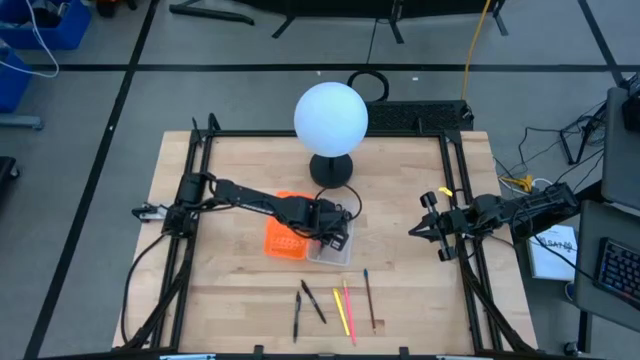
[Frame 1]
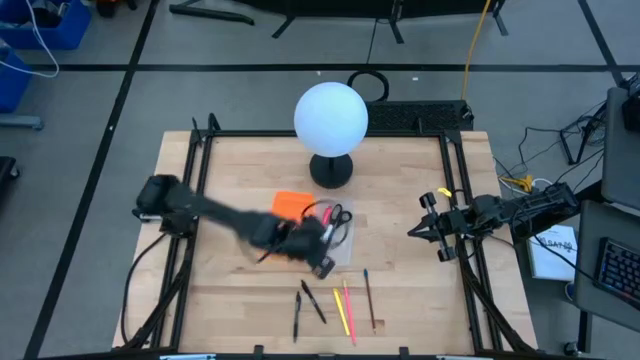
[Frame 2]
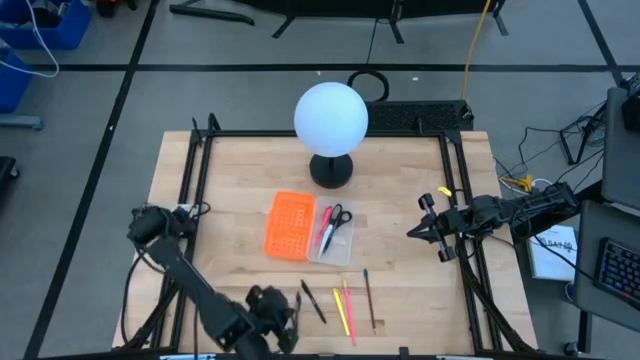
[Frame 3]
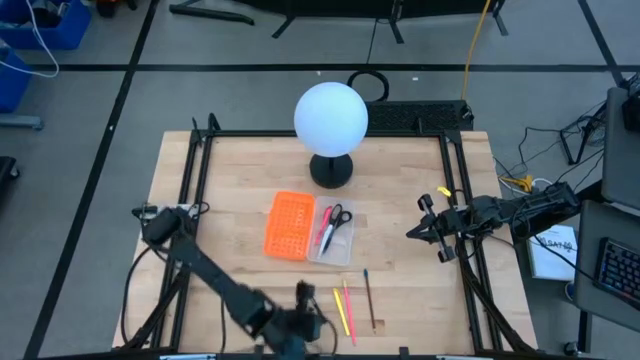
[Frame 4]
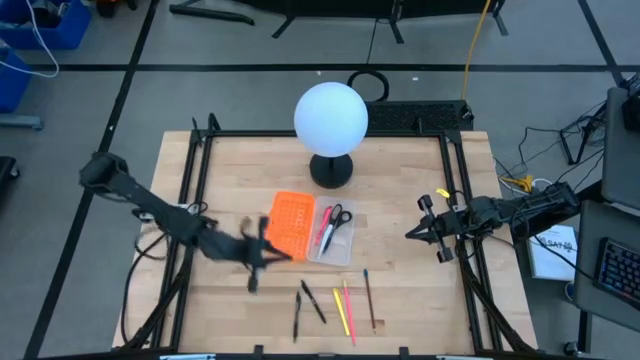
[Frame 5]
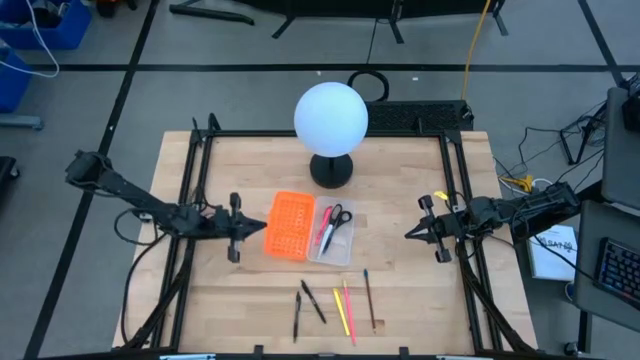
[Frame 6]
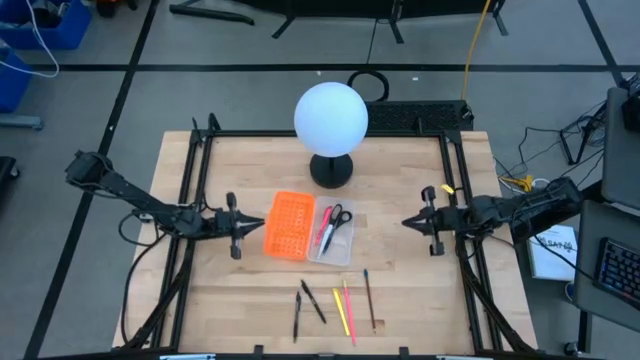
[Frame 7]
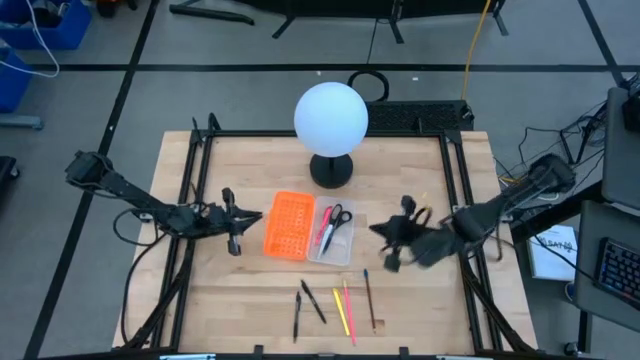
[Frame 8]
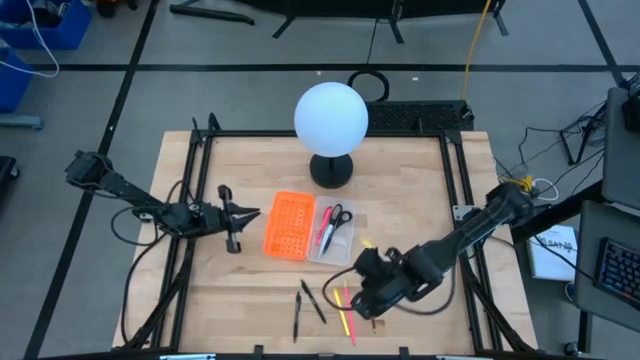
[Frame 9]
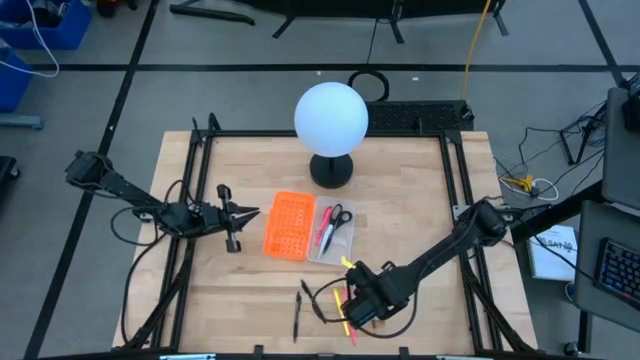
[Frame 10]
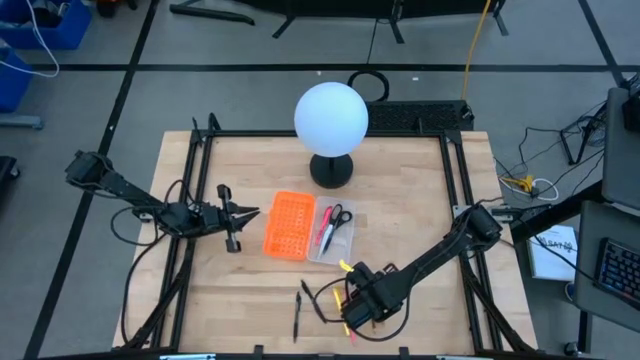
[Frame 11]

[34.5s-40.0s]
Task: Pick & place school supplies into a supply box
Put the brown pencil into the supply box

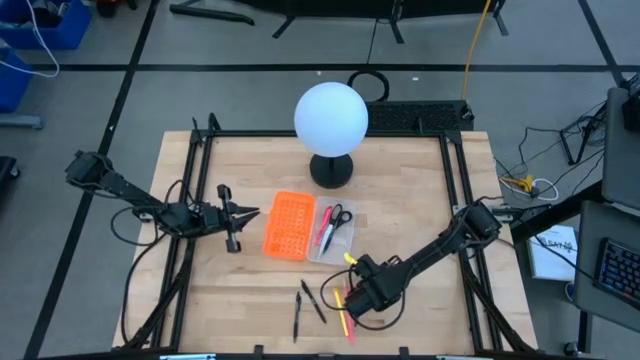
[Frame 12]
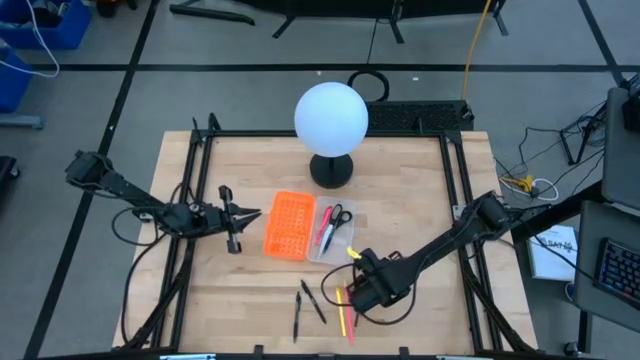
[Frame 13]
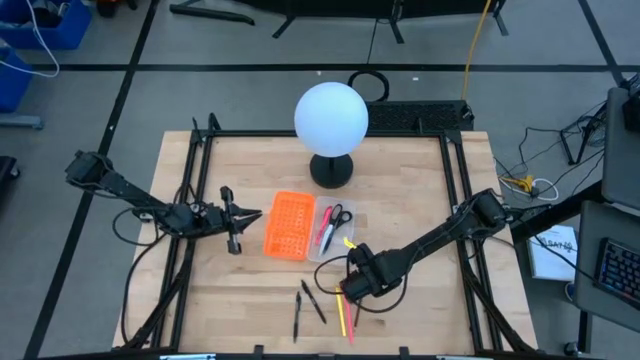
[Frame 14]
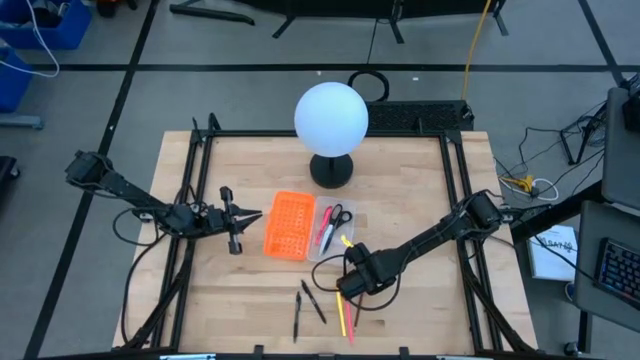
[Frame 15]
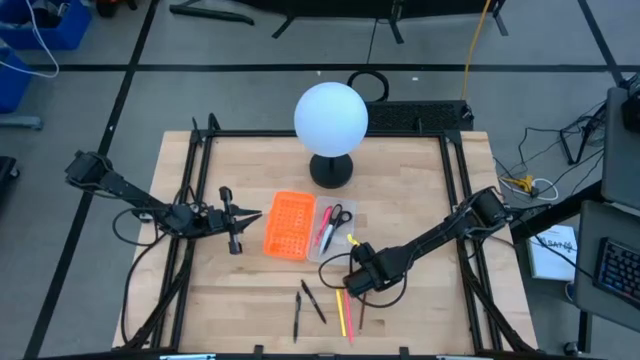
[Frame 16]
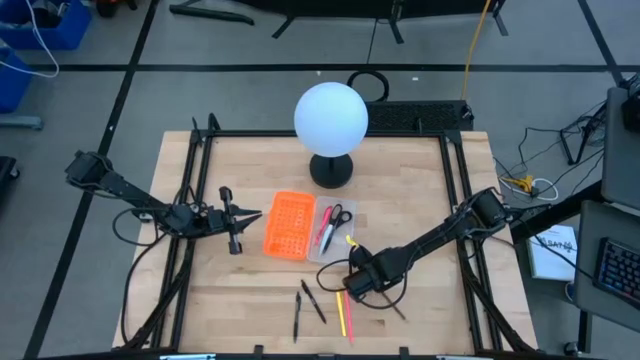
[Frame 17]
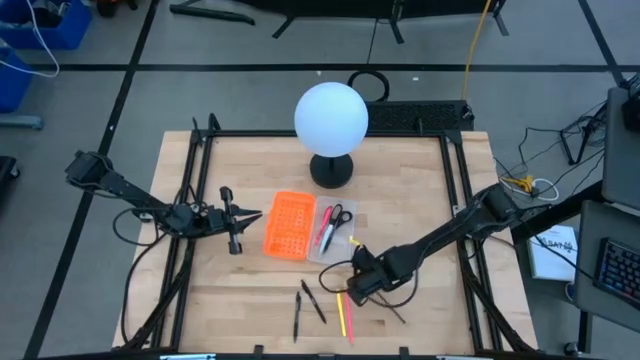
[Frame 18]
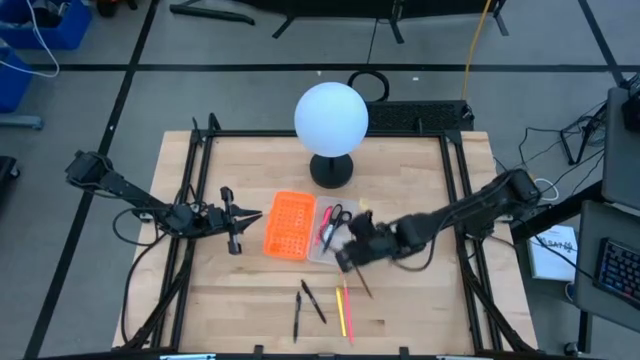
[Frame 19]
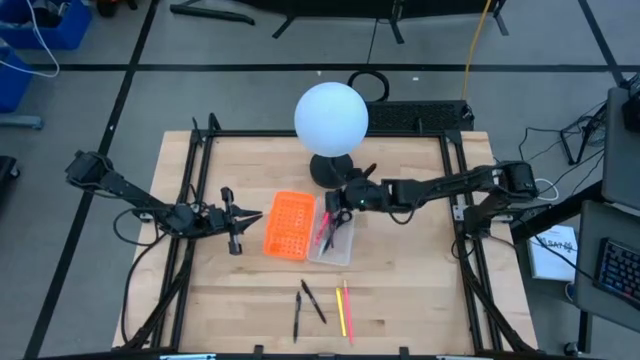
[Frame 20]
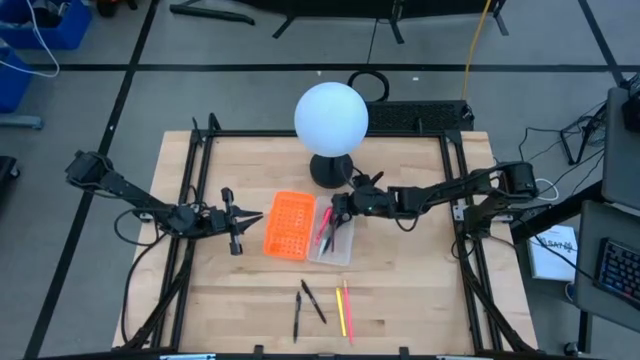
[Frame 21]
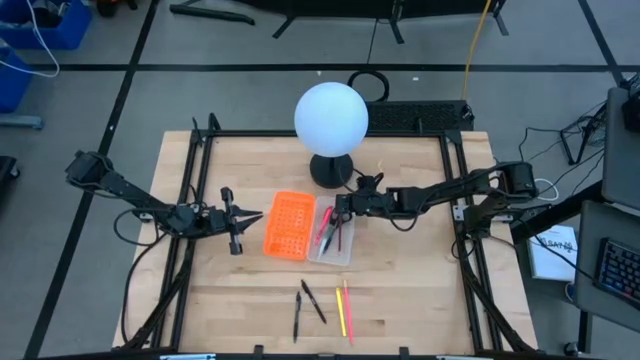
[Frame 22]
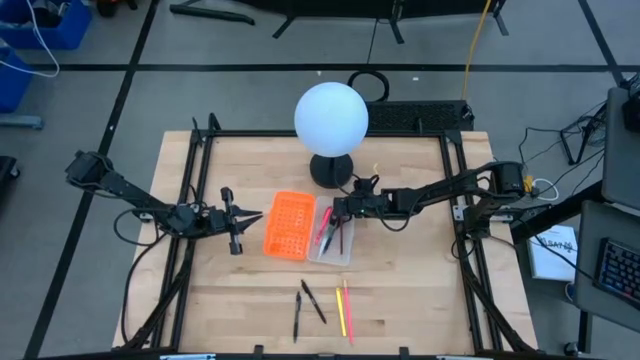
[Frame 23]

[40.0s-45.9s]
Put the brown pencil into the supply box

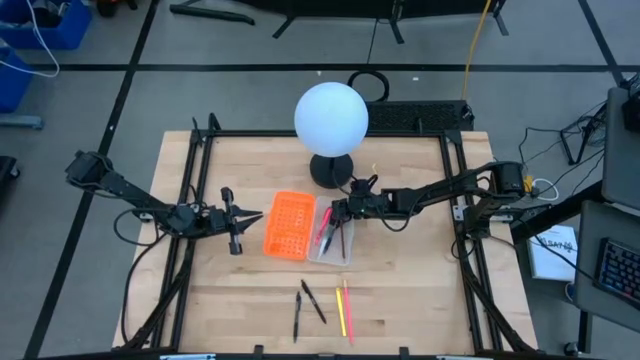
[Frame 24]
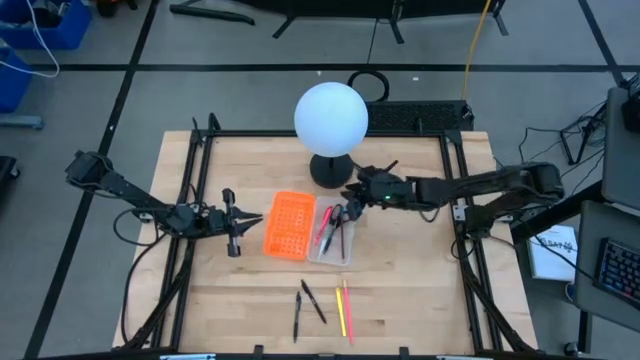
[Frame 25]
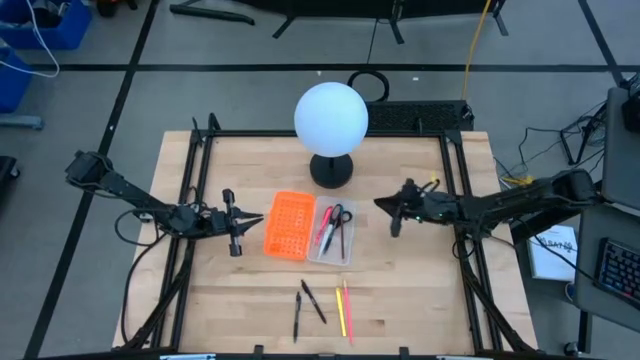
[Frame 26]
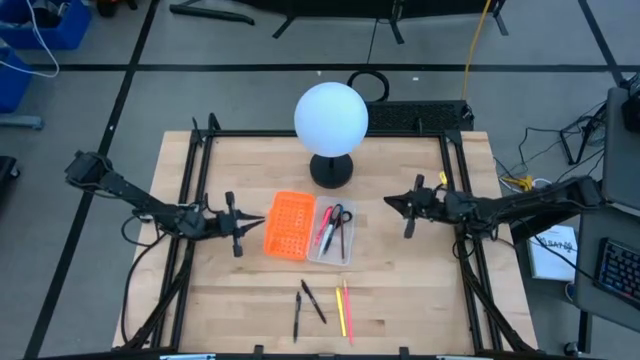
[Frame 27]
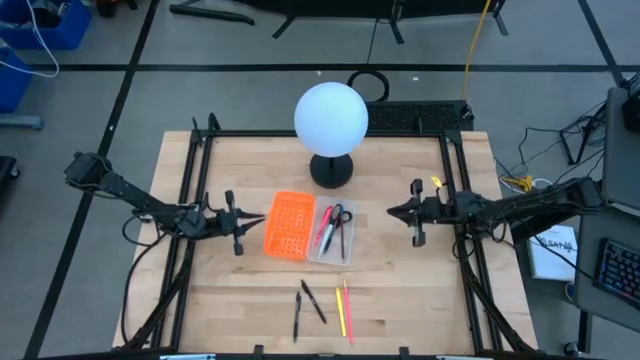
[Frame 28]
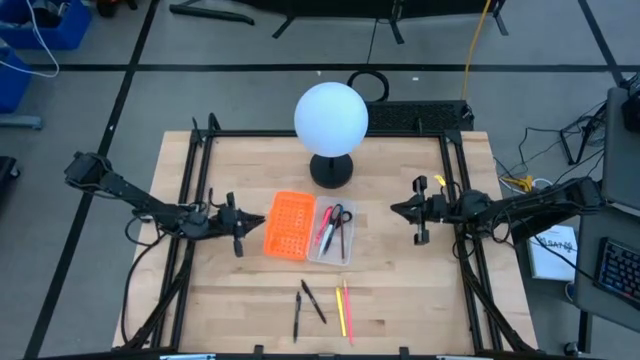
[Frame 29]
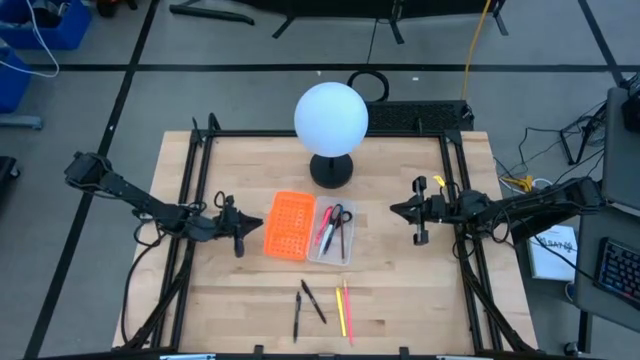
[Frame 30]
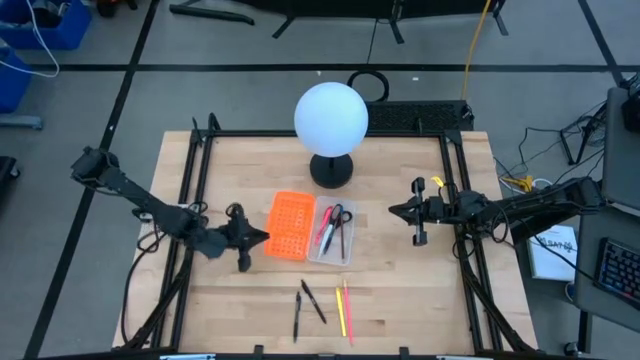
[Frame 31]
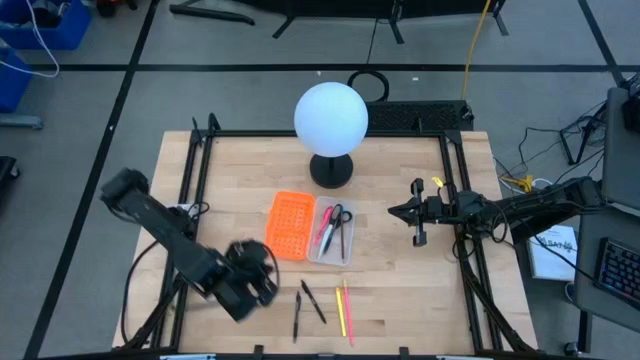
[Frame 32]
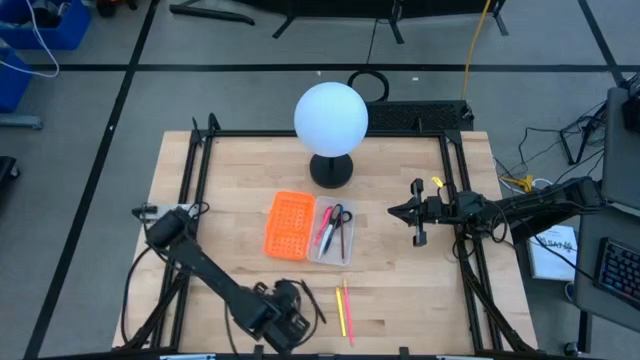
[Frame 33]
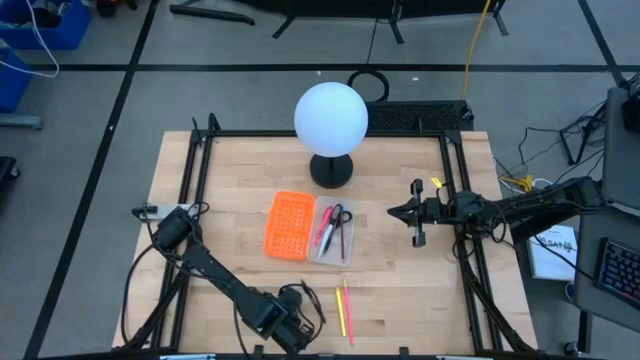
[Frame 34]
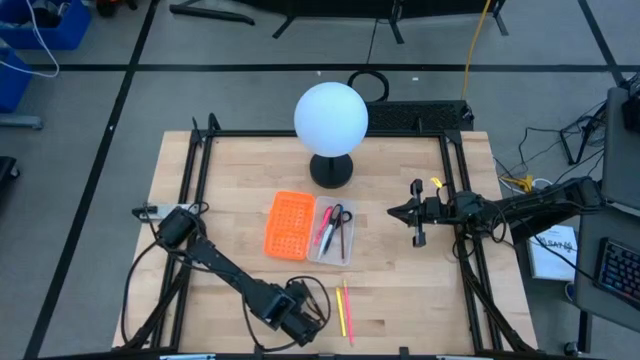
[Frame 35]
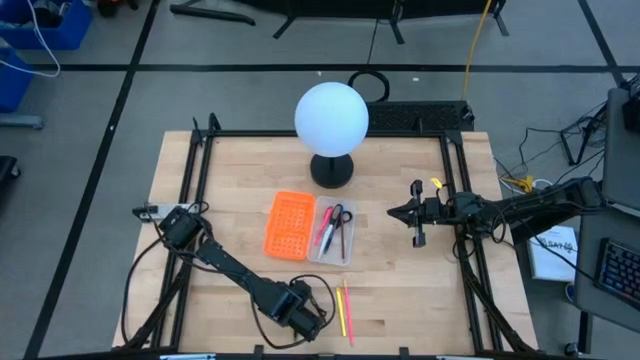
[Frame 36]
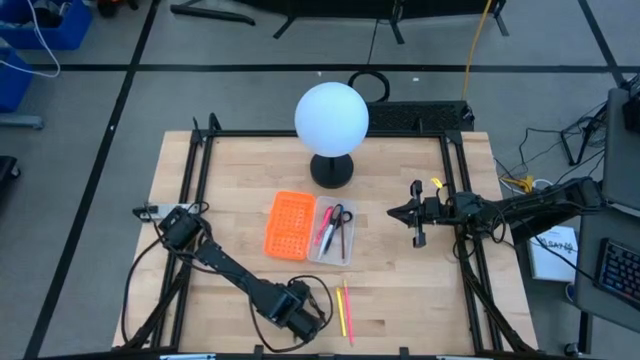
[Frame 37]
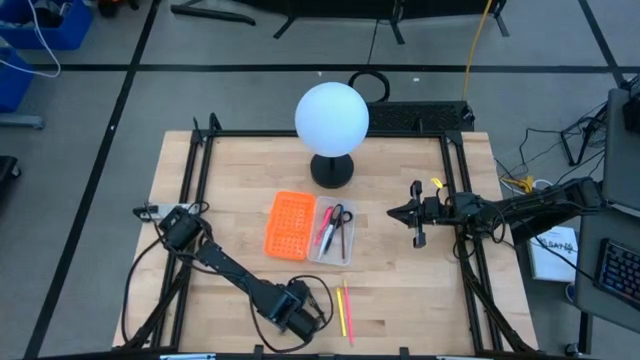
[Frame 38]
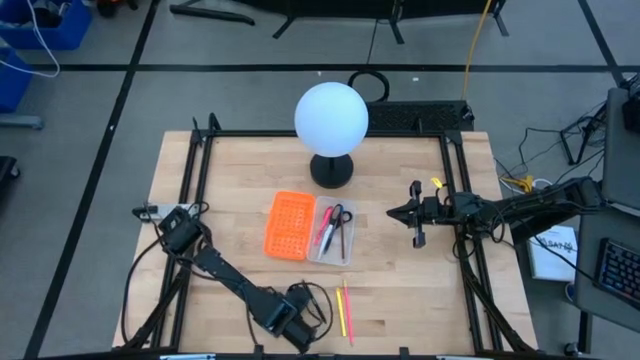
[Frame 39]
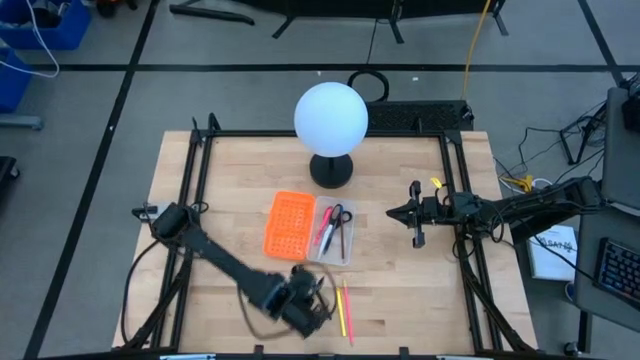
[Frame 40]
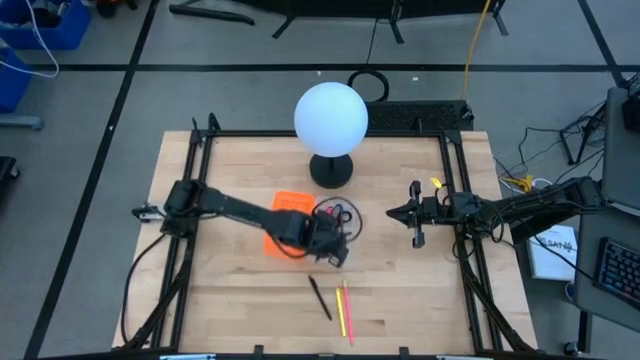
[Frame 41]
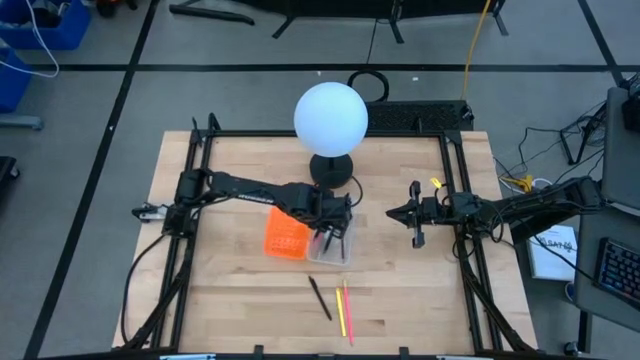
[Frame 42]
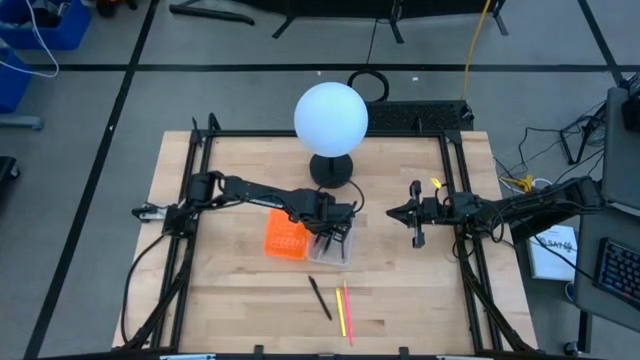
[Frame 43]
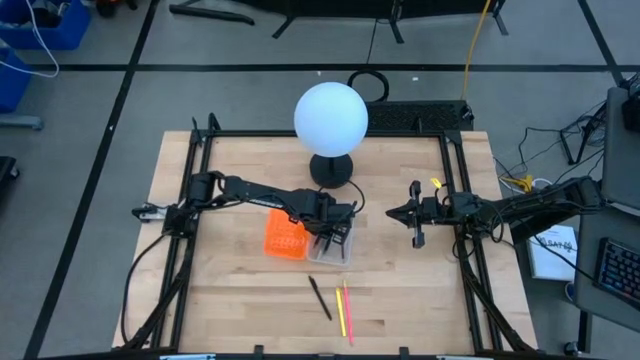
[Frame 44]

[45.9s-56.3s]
Put the left black pen into the supply box

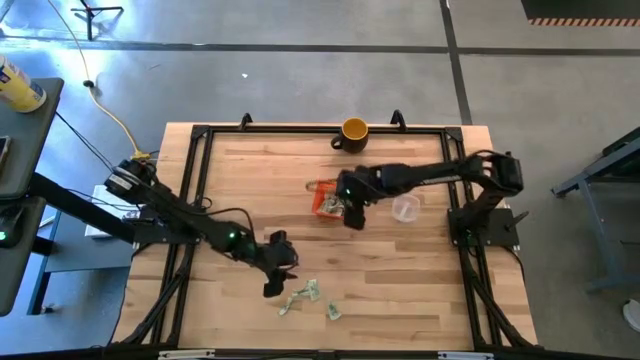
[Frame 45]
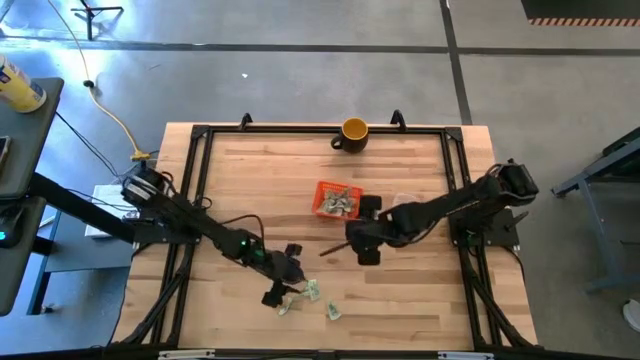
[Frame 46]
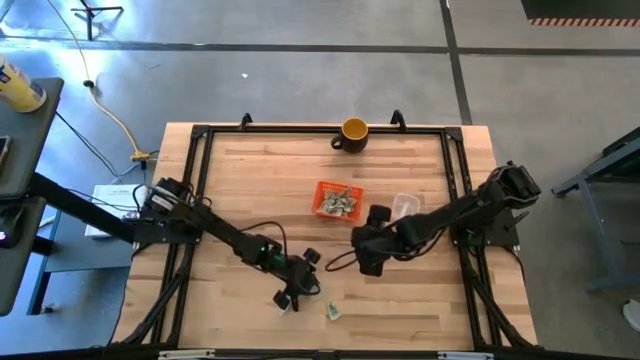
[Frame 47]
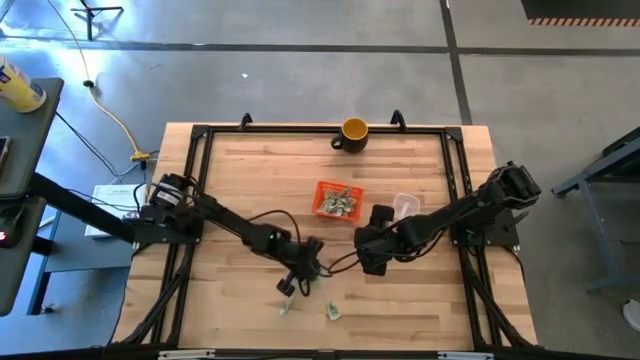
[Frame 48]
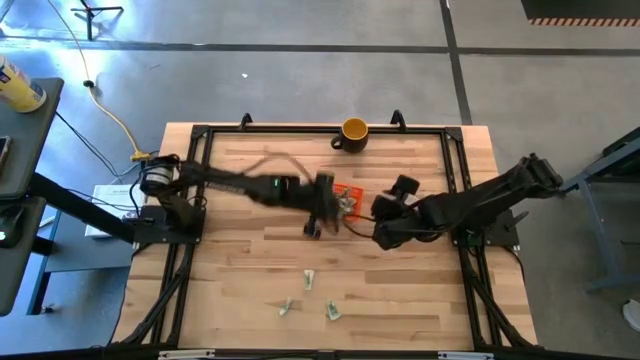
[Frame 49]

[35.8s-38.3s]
Task: Pick and place items into bin
Put the white stevia packet into the orange bin
